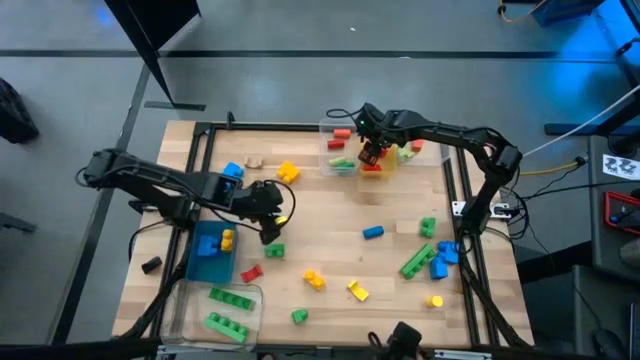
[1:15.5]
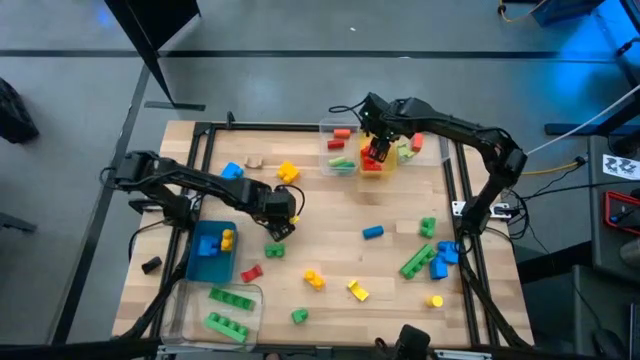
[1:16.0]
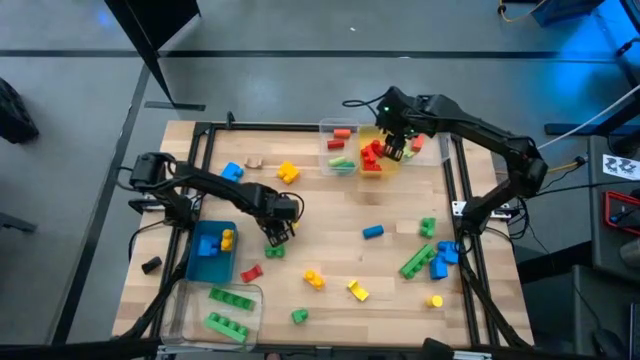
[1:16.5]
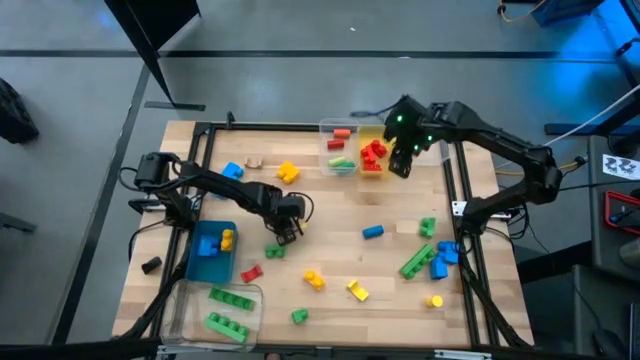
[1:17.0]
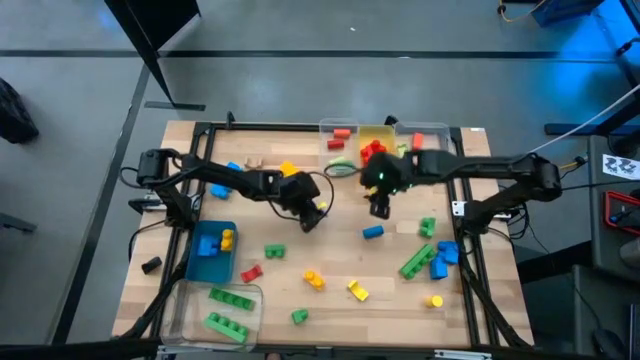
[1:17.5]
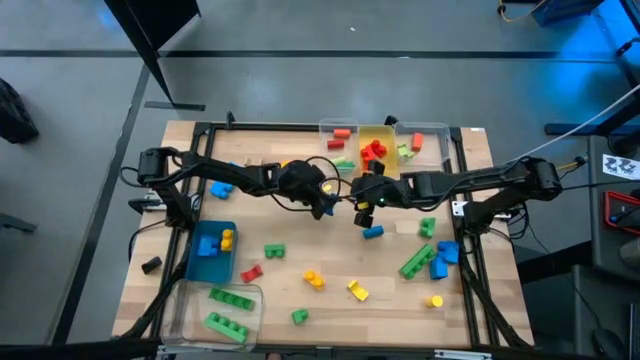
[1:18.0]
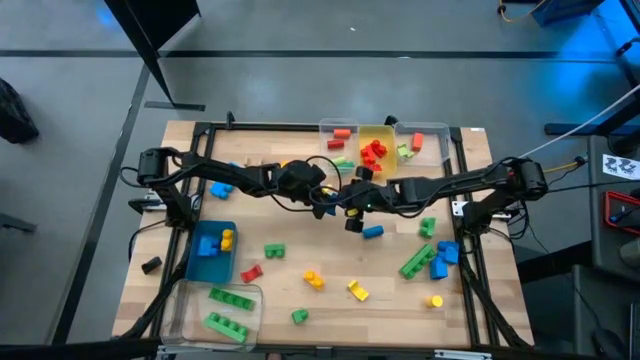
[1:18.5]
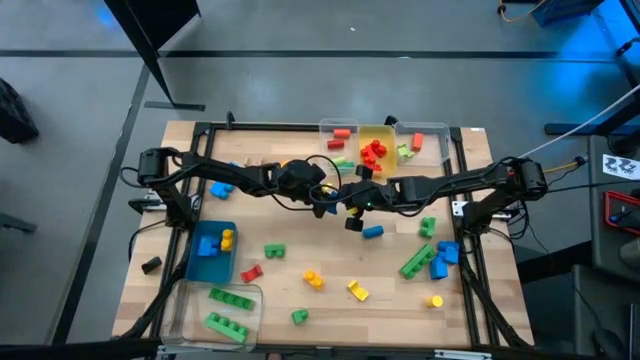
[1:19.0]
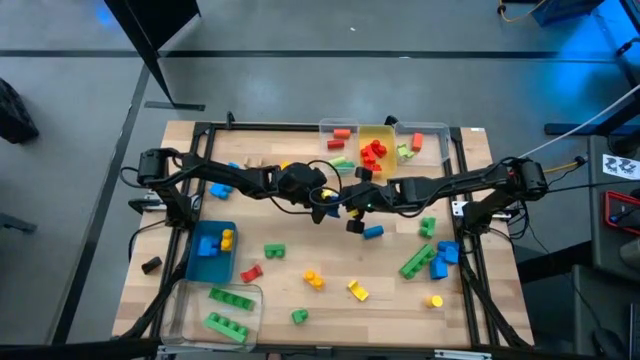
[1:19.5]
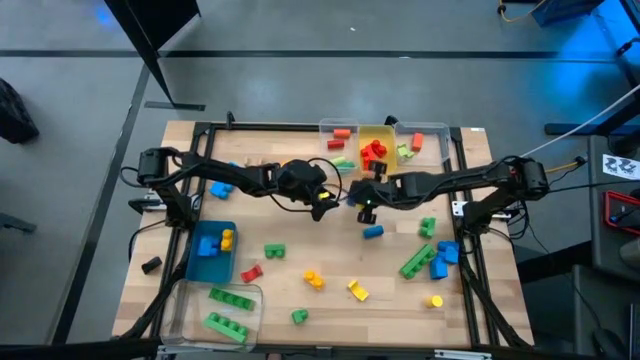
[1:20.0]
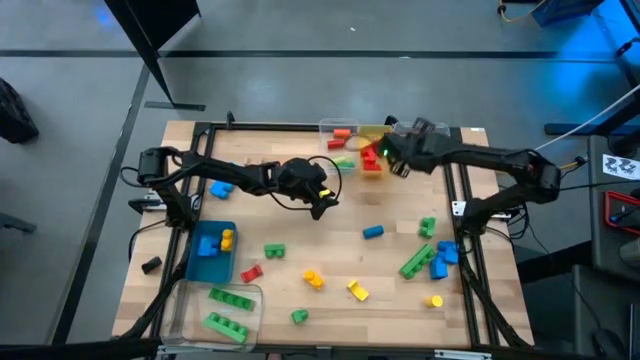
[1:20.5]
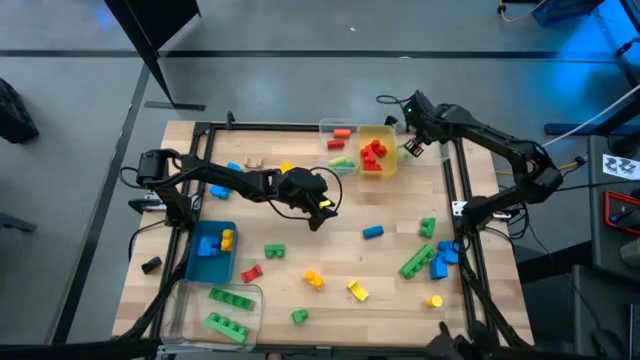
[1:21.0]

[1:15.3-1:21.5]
Task: Sort blocks by size
Put the blue arch block into the top right transparent bin

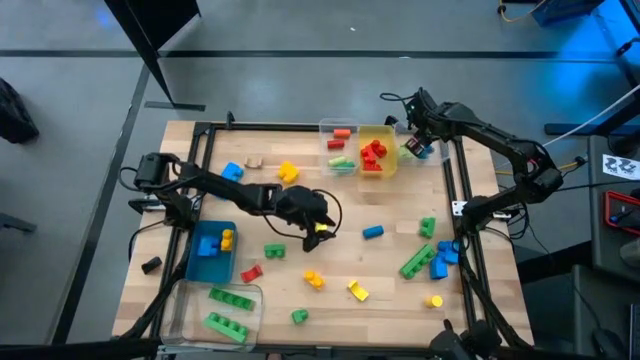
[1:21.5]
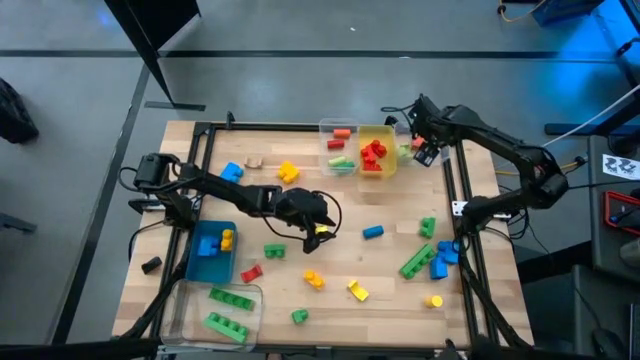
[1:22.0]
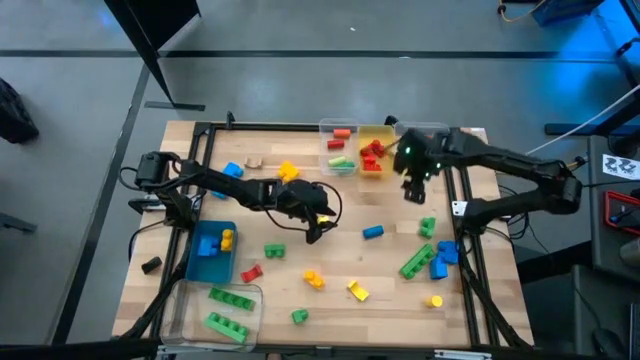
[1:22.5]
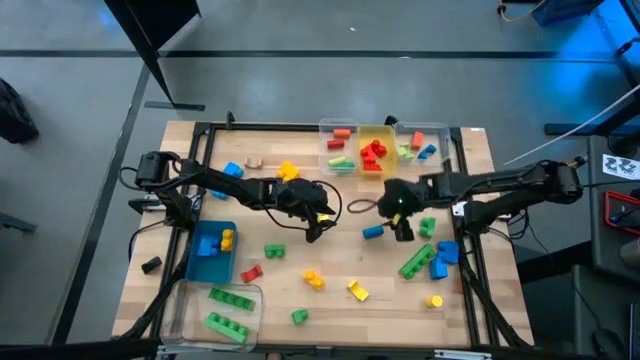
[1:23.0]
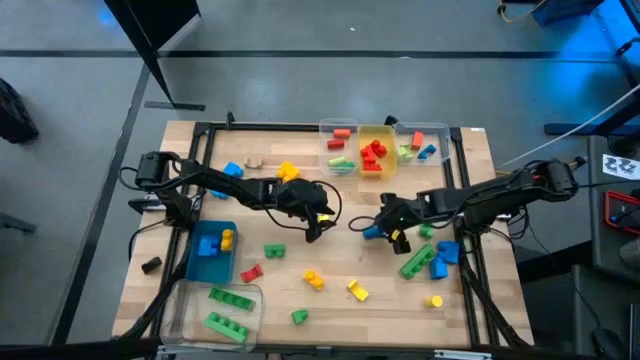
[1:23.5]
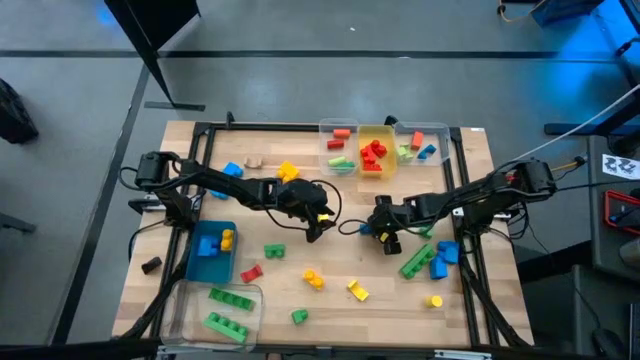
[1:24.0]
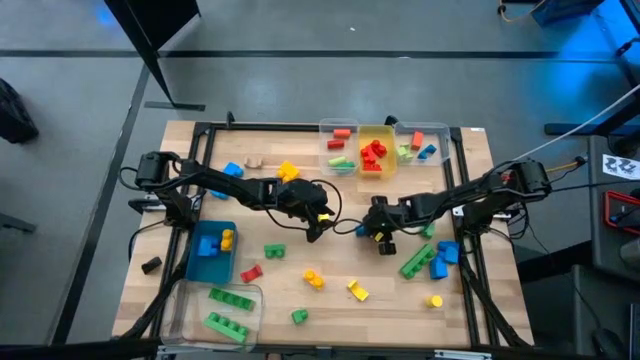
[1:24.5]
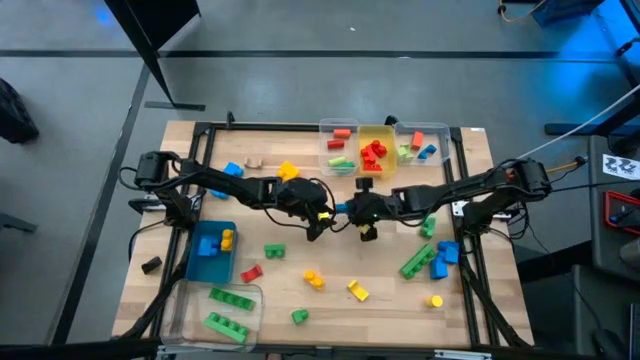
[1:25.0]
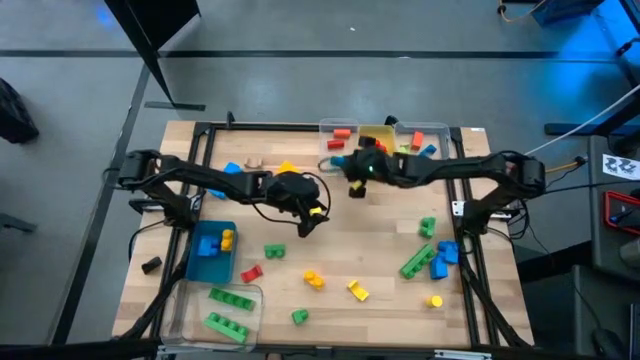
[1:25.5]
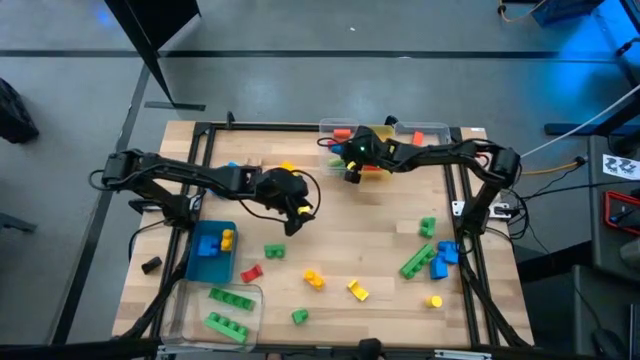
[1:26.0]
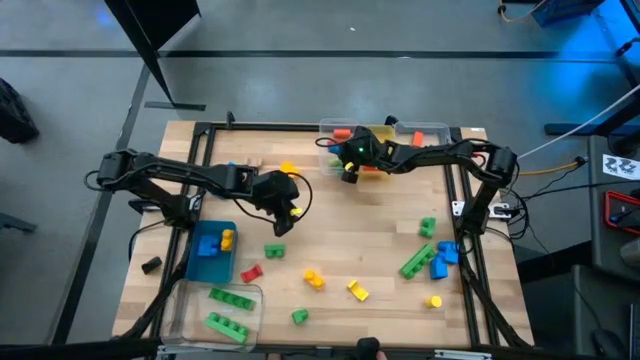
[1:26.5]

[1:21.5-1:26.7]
Put the blue cylindrical block into the top left transparent bin

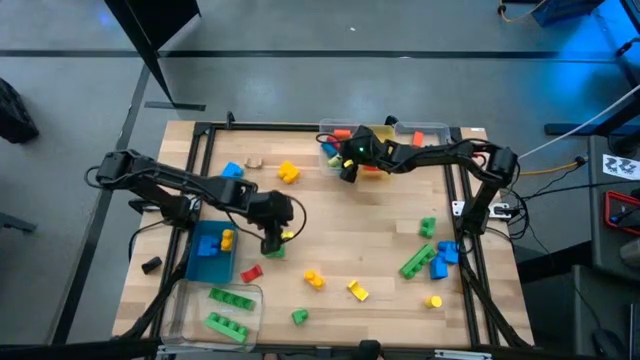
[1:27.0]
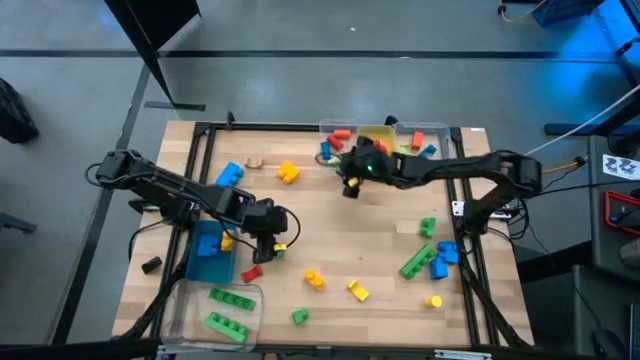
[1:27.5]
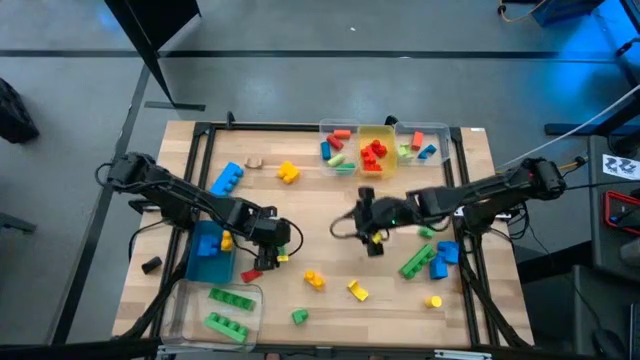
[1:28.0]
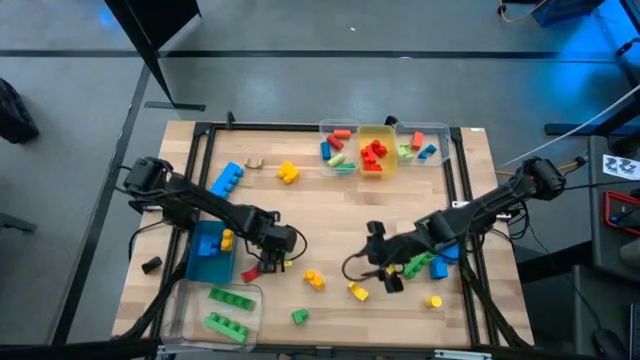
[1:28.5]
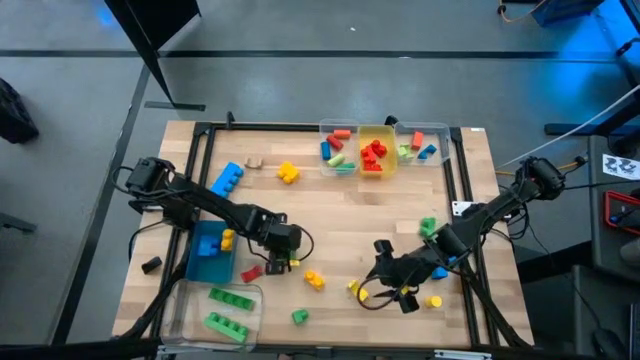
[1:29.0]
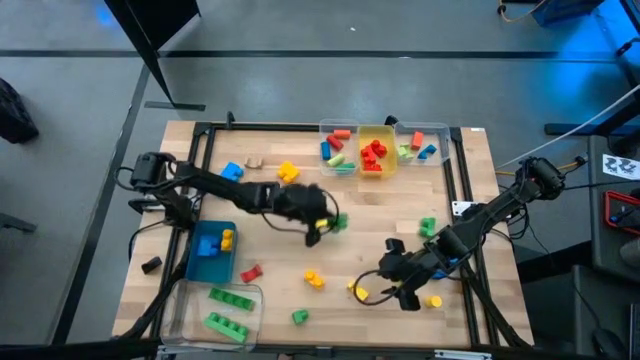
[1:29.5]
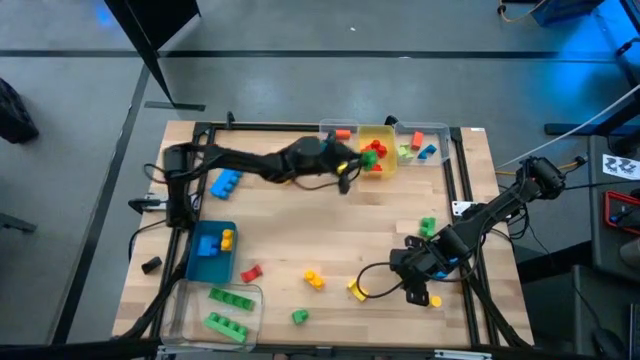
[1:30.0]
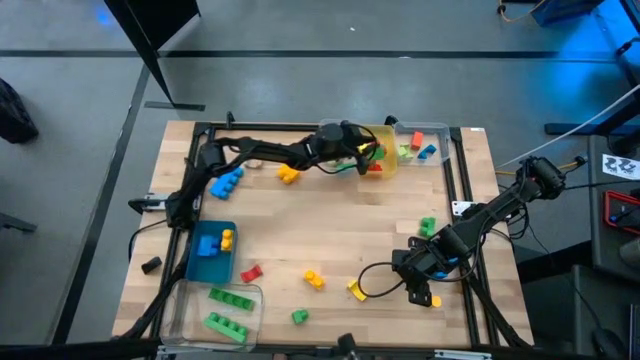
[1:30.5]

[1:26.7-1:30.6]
Put the green 2 stud game piece into the yellow bin

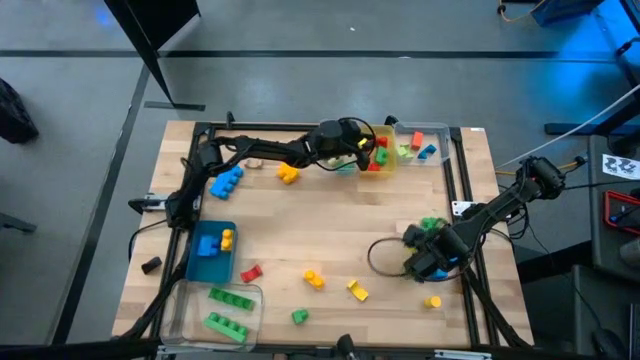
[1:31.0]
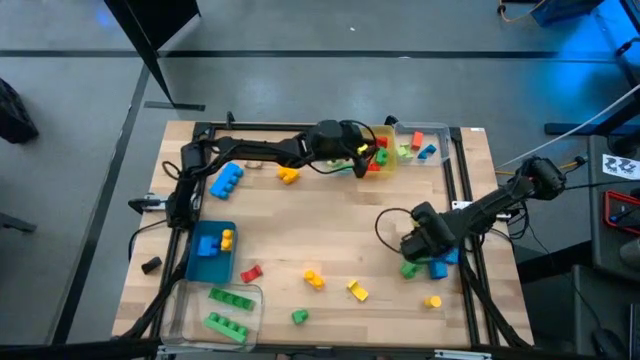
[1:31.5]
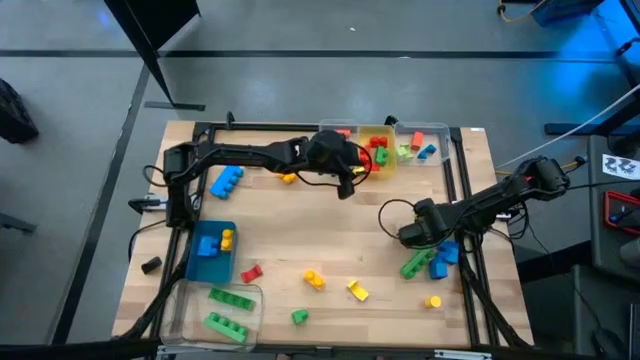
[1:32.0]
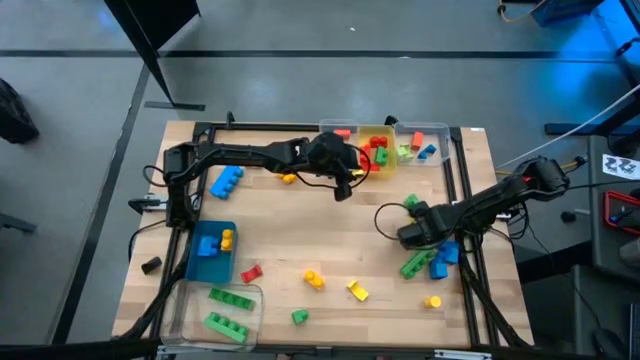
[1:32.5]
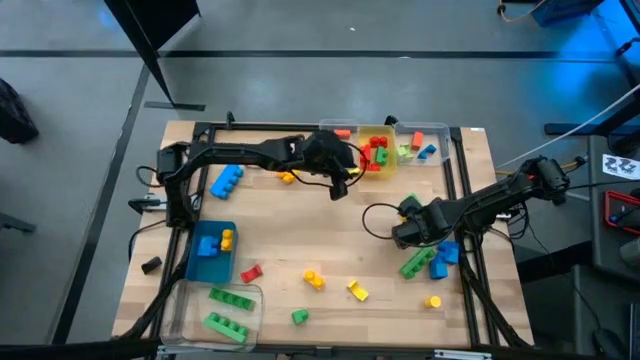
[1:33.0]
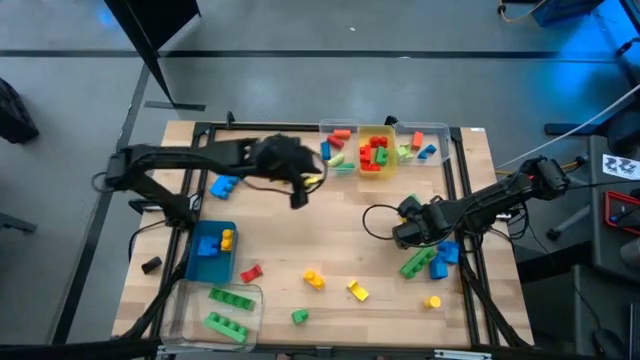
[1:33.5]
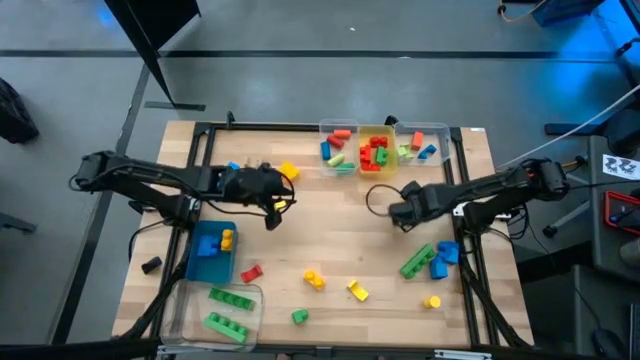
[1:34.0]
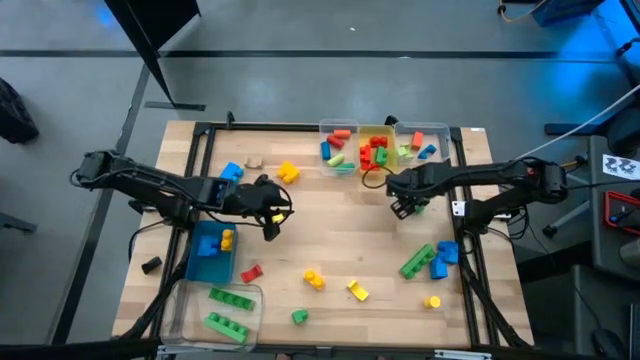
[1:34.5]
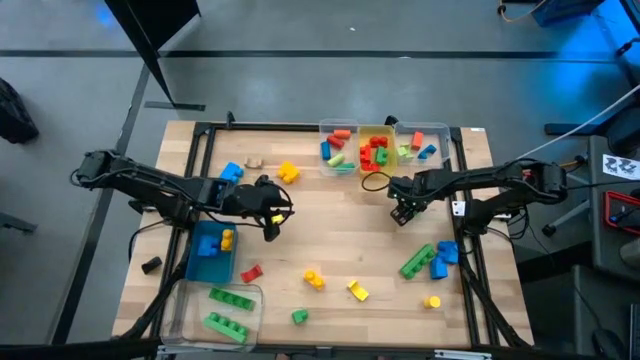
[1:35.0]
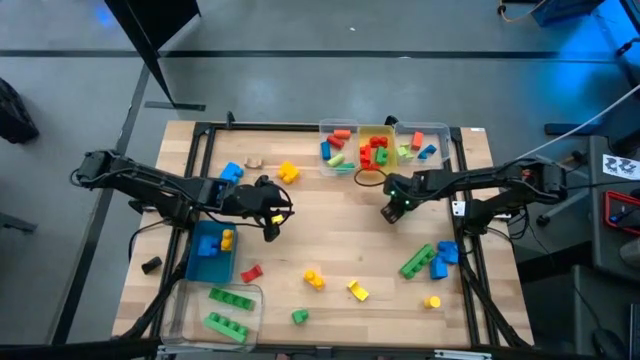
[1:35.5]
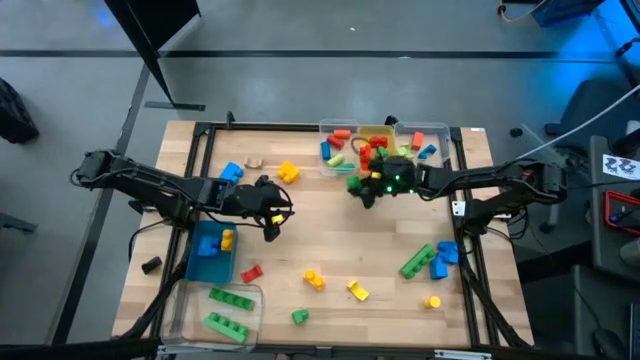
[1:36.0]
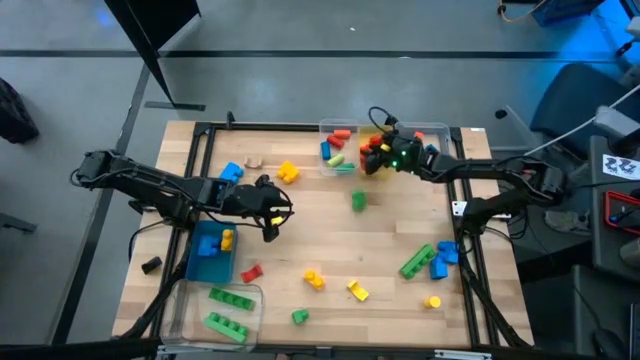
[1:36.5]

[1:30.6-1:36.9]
Put the green 2 stud game piece into the yellow bin
